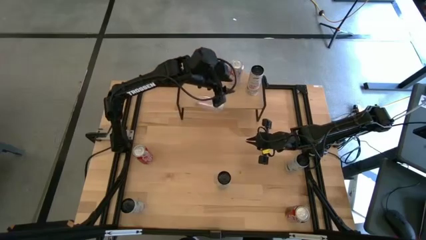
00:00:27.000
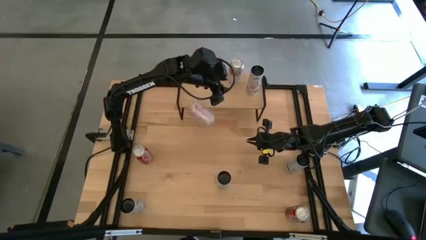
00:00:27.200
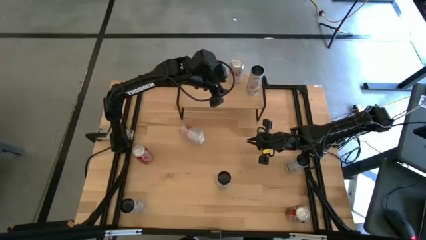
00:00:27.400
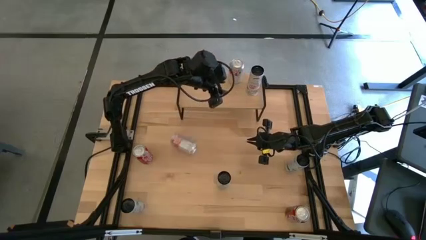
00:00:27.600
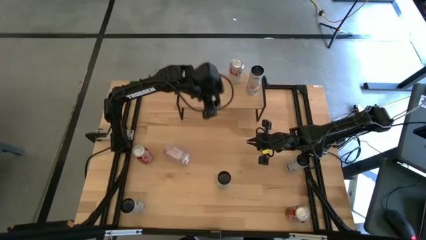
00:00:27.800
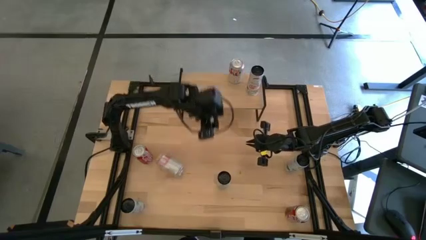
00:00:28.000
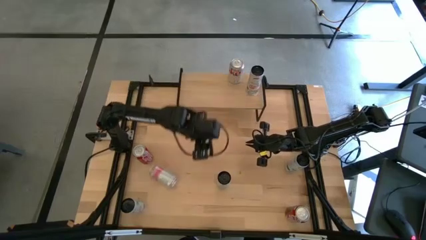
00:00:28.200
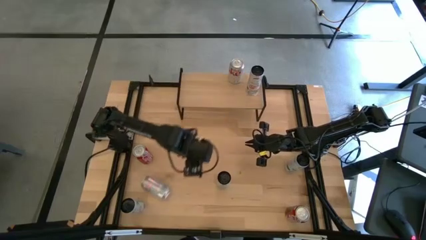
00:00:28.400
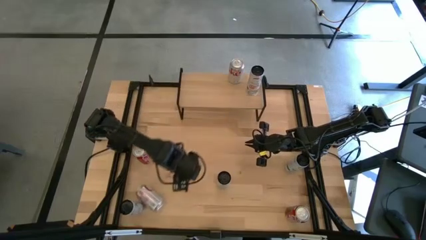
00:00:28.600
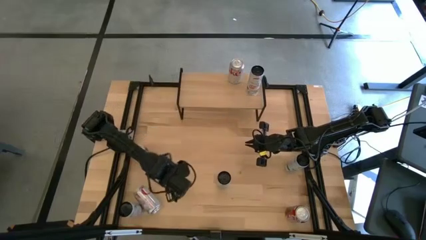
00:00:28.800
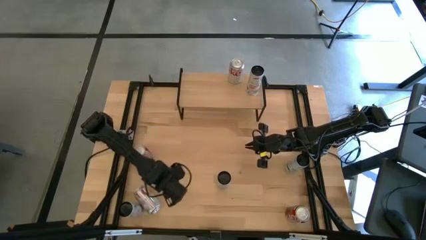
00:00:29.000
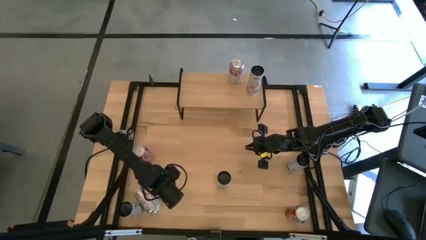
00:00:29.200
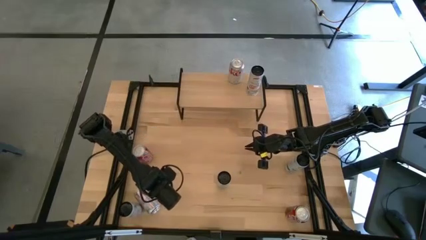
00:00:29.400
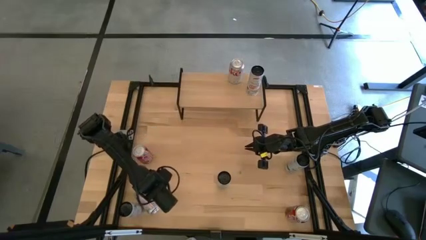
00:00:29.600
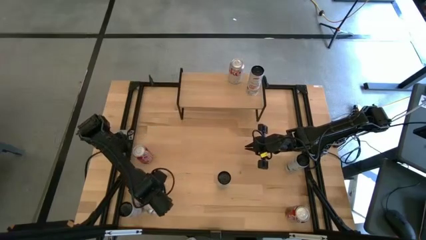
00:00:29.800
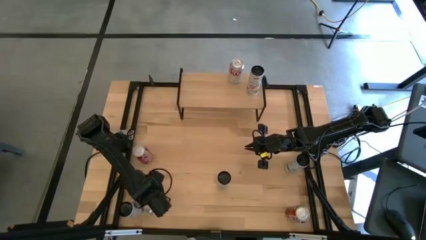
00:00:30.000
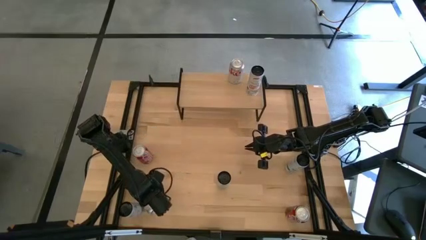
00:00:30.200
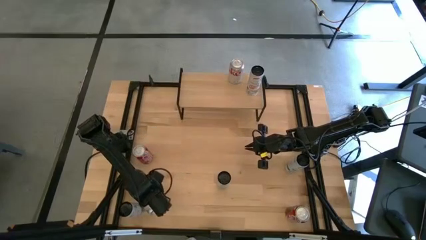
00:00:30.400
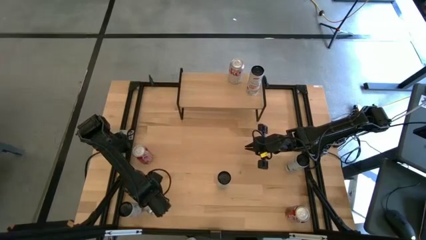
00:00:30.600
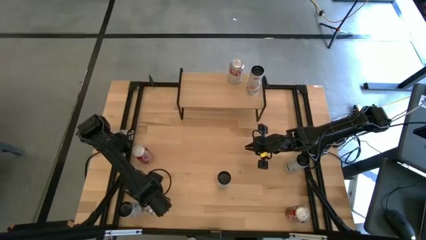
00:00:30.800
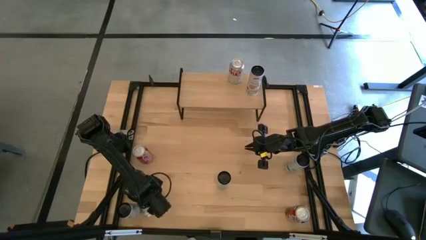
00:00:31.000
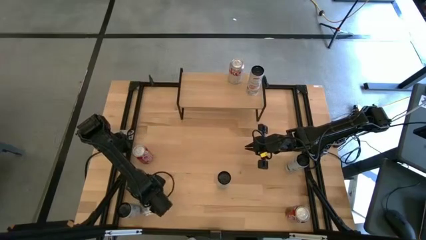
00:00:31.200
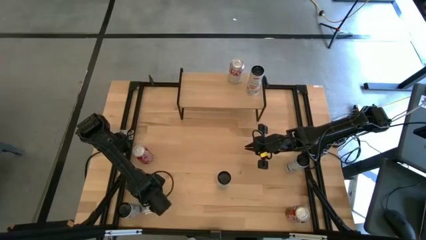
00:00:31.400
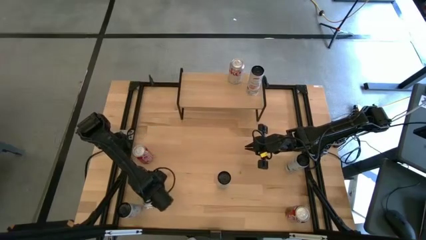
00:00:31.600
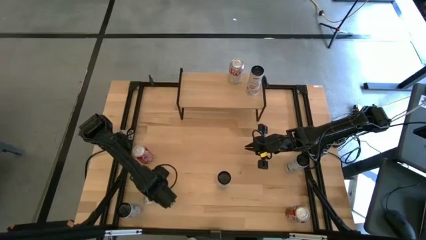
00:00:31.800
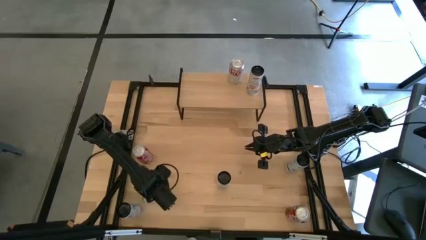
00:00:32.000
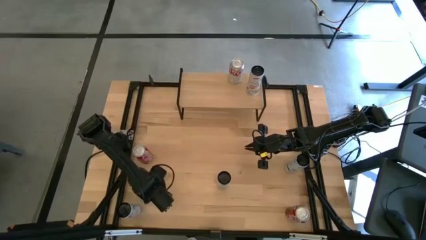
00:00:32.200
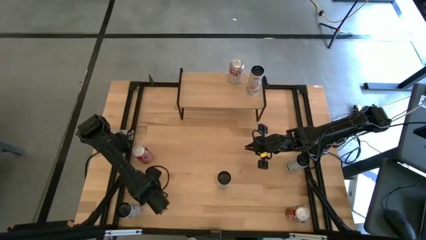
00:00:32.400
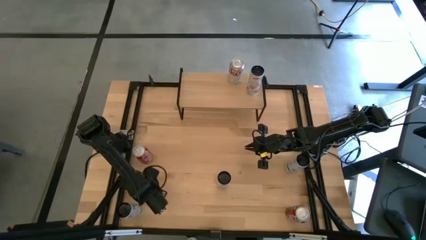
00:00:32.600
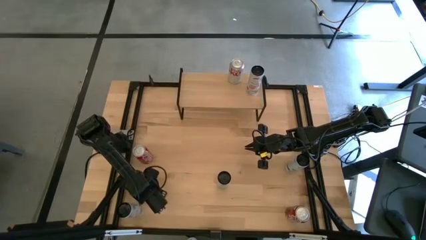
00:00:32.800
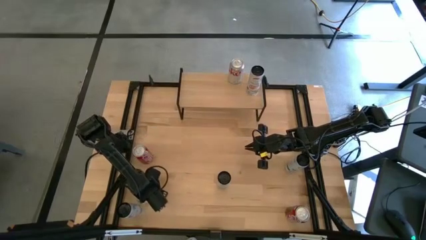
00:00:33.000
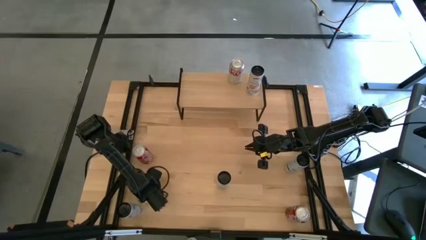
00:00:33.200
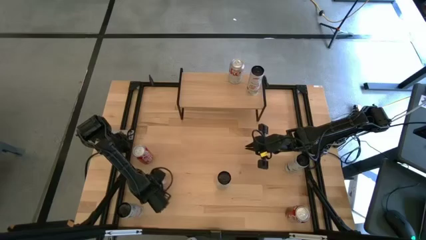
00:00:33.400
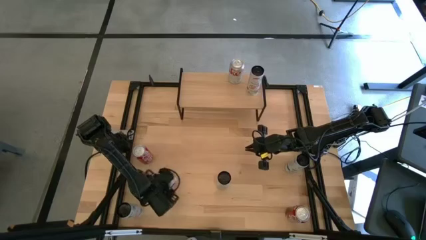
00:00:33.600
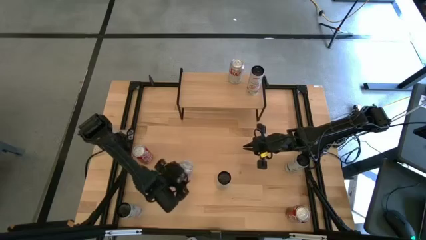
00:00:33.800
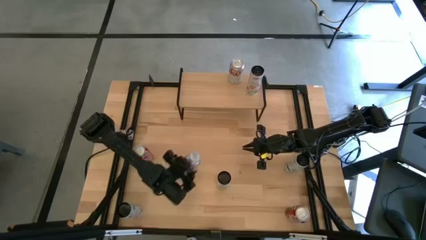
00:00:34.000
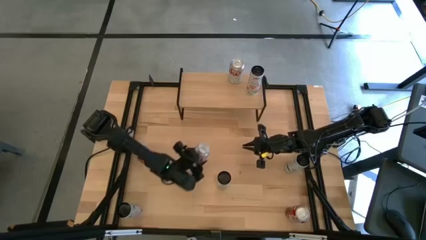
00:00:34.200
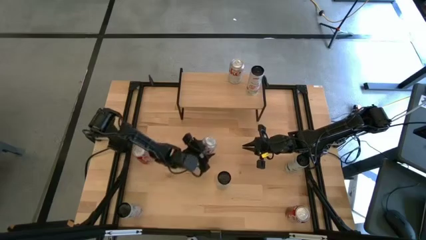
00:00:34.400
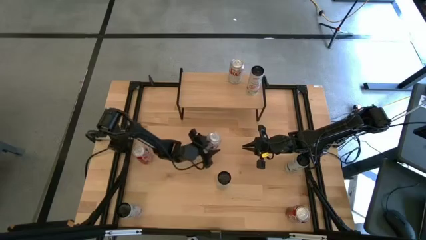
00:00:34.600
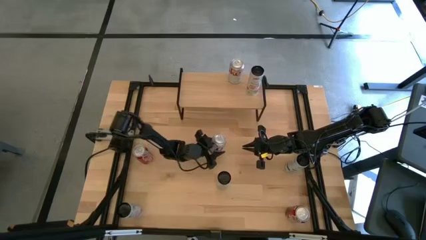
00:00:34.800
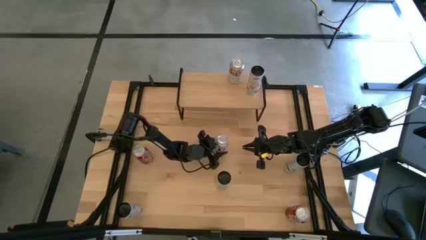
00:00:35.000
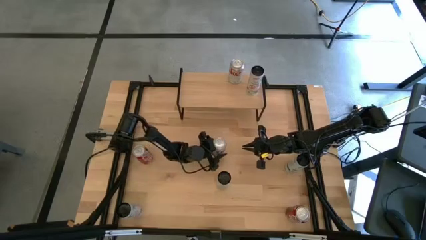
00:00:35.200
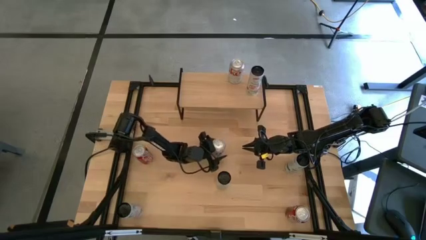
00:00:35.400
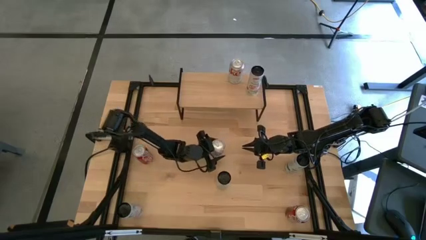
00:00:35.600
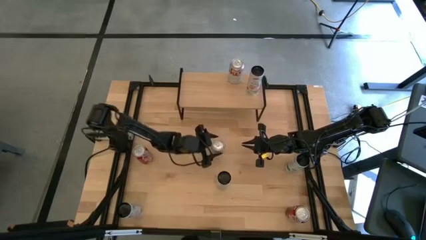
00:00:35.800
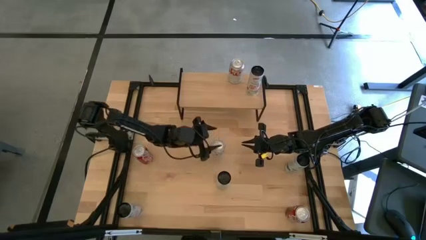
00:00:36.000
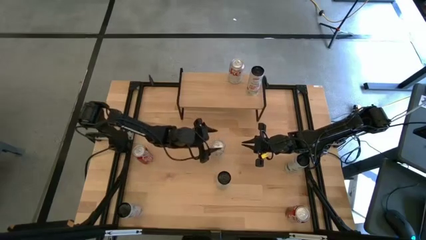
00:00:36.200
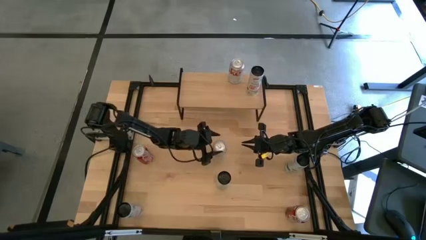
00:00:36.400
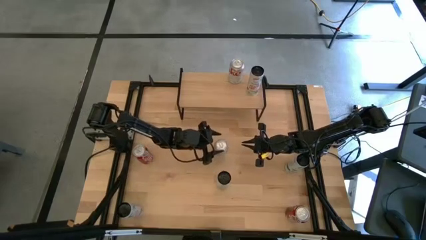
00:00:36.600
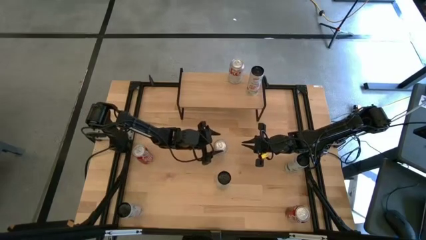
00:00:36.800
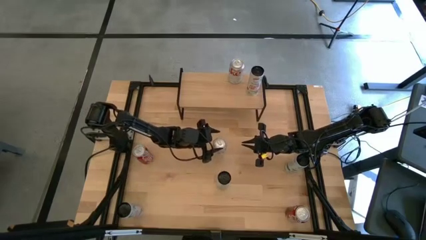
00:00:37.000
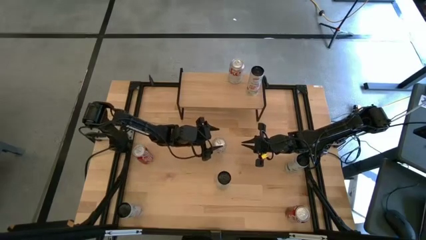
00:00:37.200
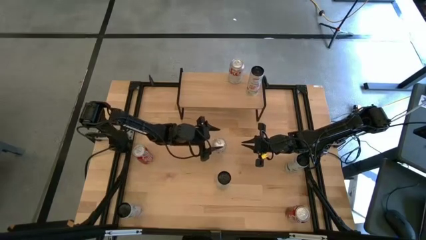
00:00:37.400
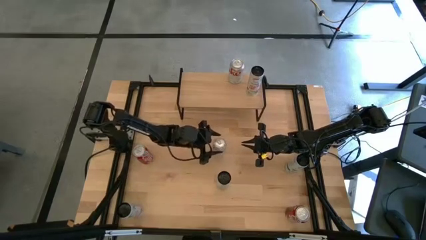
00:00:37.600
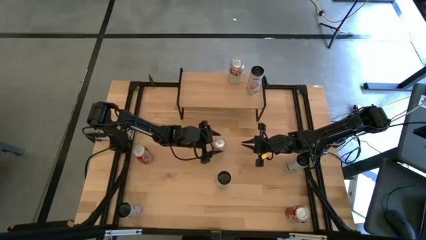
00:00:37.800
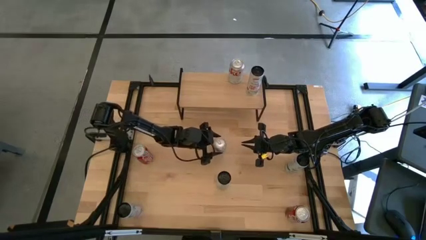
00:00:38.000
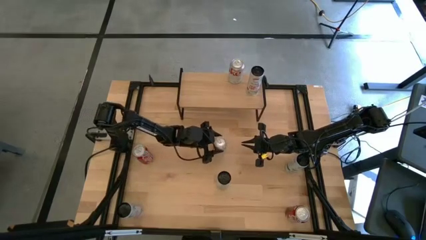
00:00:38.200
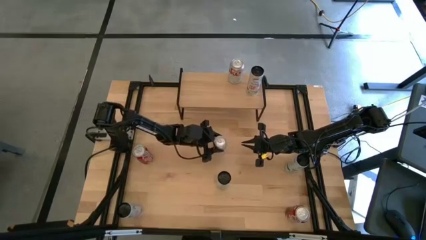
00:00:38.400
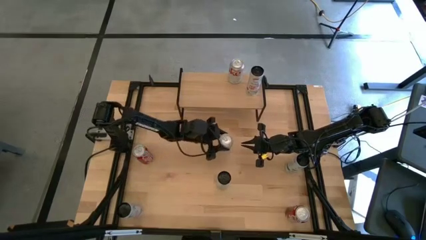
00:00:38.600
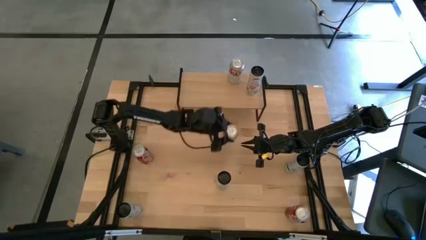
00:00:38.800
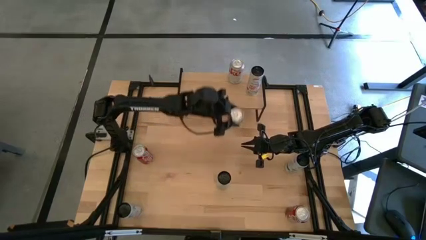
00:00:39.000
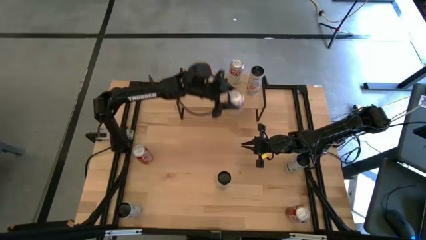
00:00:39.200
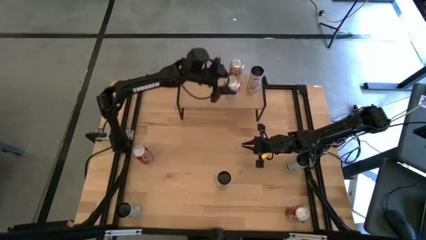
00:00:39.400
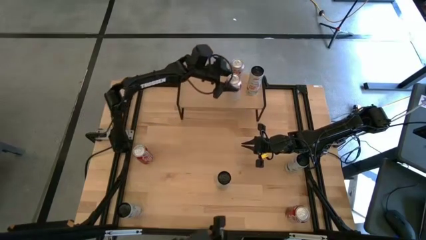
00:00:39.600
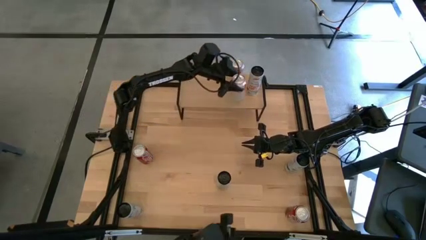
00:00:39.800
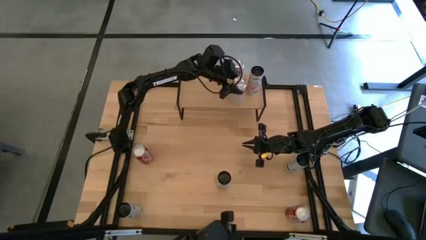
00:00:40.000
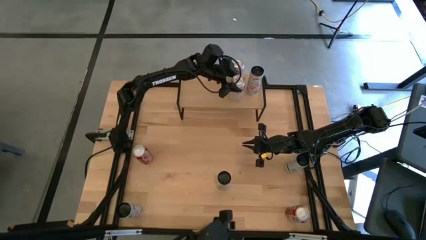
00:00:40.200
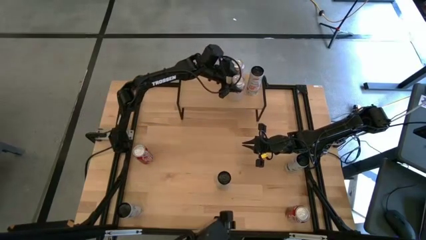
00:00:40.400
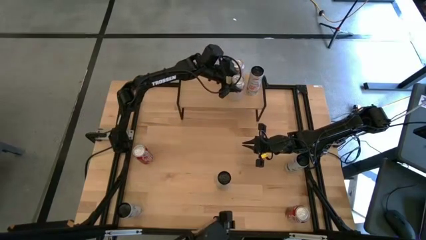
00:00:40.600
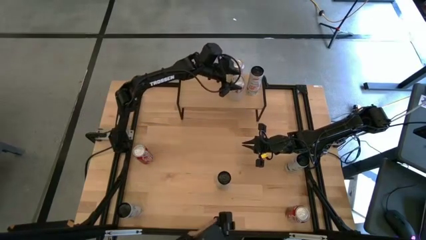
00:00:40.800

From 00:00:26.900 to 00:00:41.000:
Task: Place canned beverage on shelf
Put the red-silver soda can on the shelf aligned with the other red-silver soda can
